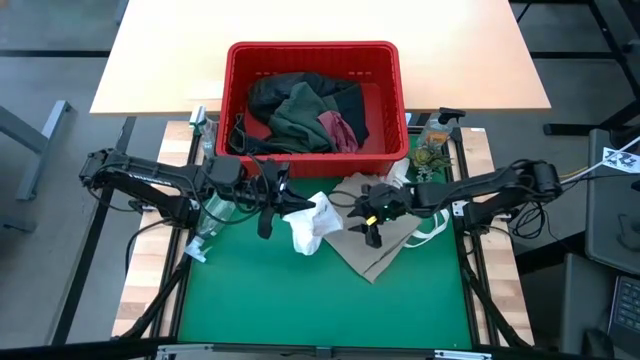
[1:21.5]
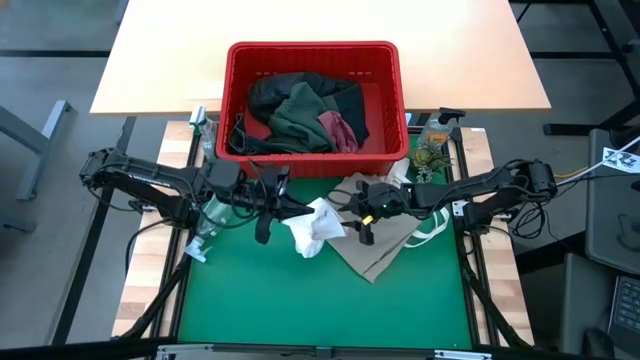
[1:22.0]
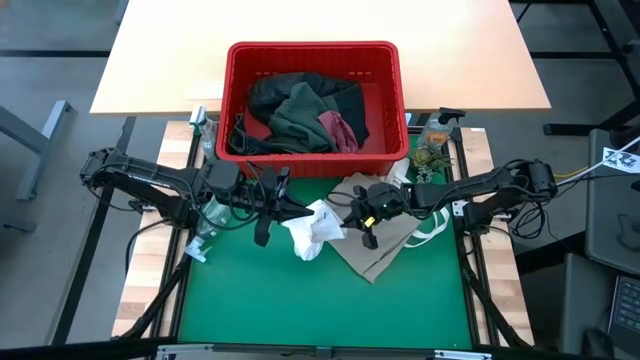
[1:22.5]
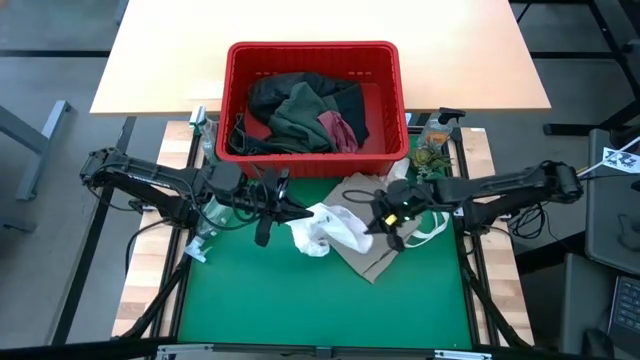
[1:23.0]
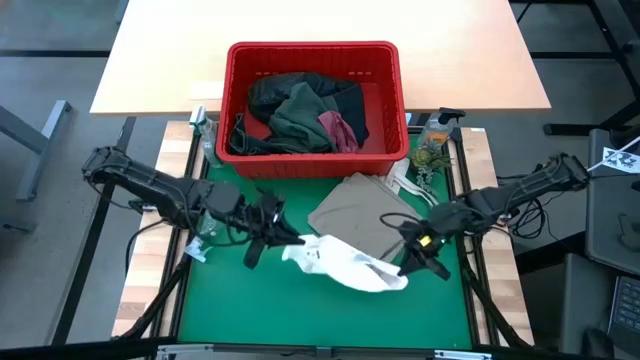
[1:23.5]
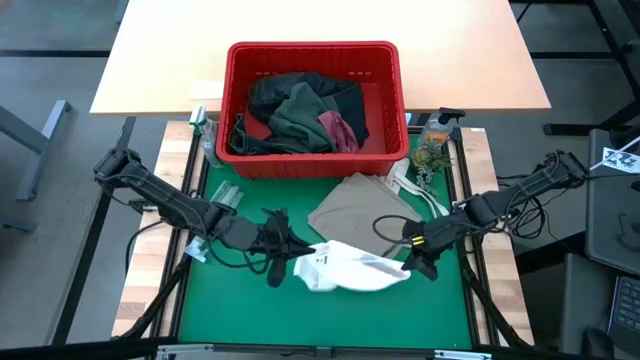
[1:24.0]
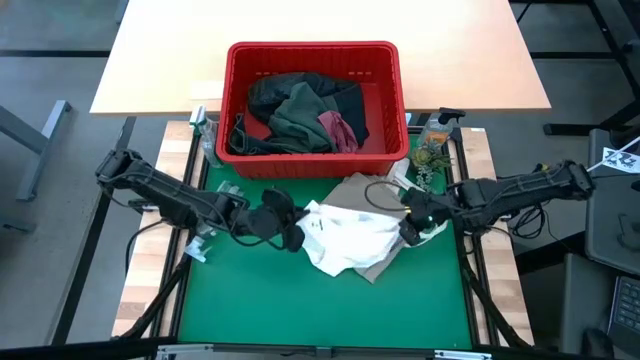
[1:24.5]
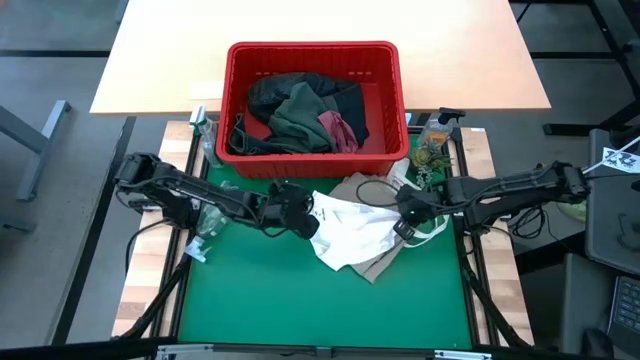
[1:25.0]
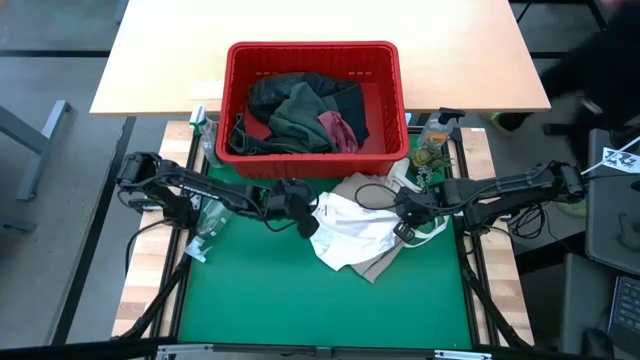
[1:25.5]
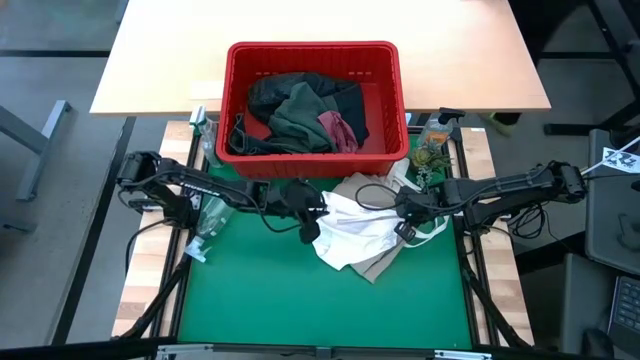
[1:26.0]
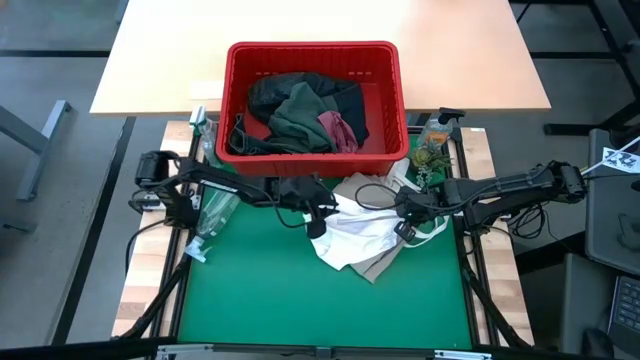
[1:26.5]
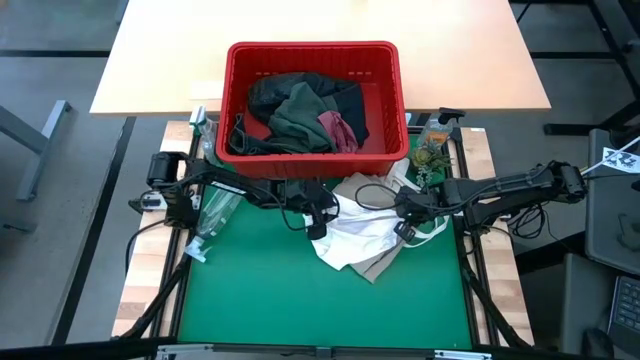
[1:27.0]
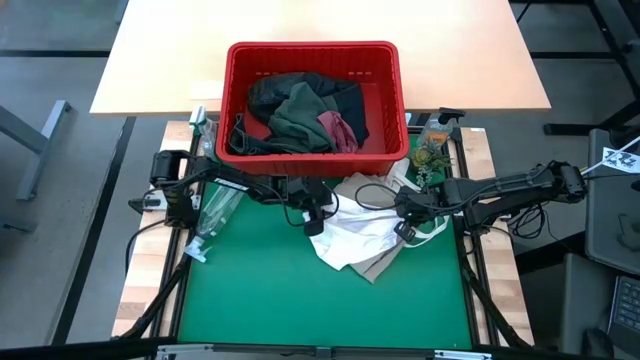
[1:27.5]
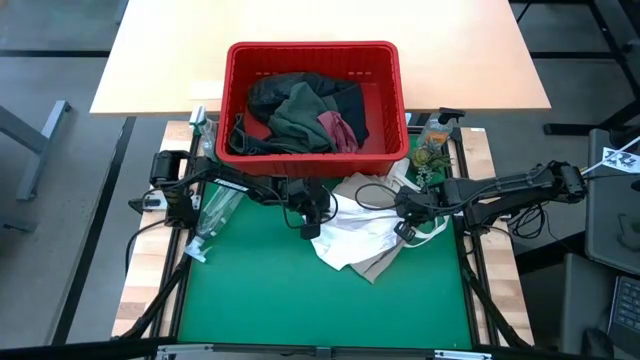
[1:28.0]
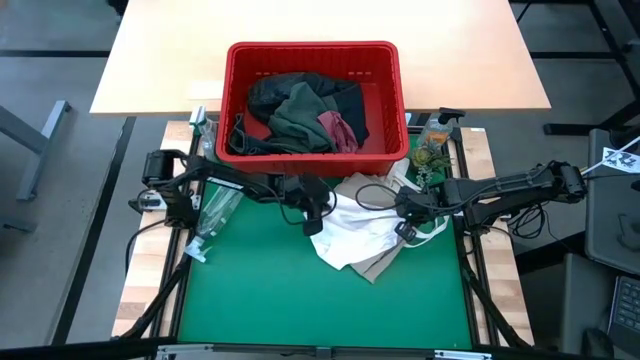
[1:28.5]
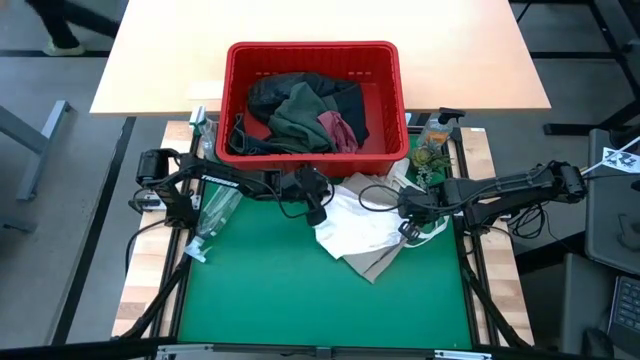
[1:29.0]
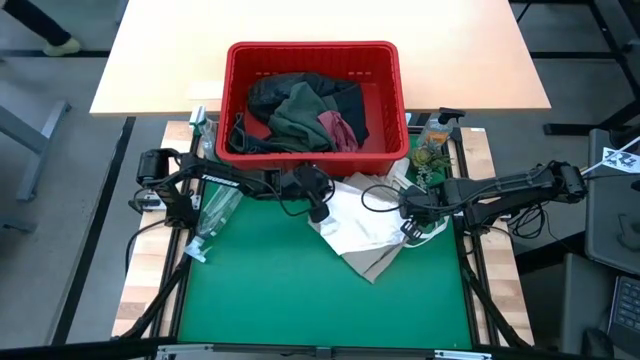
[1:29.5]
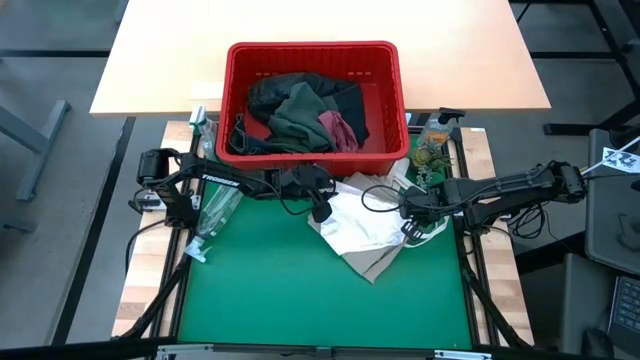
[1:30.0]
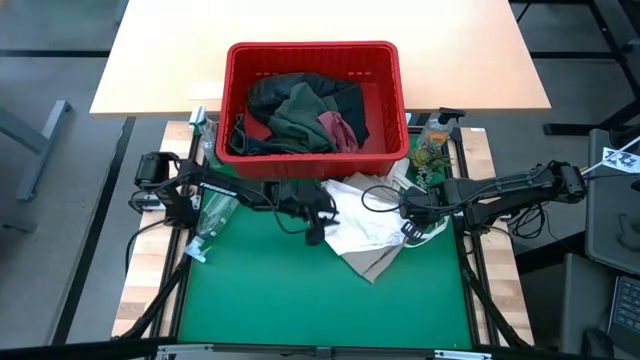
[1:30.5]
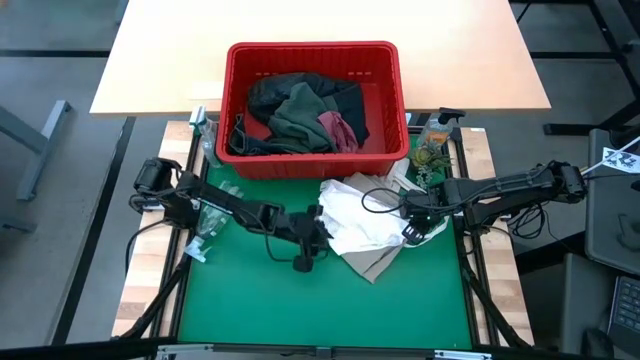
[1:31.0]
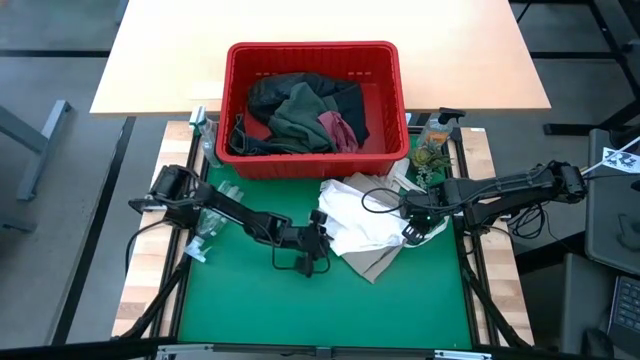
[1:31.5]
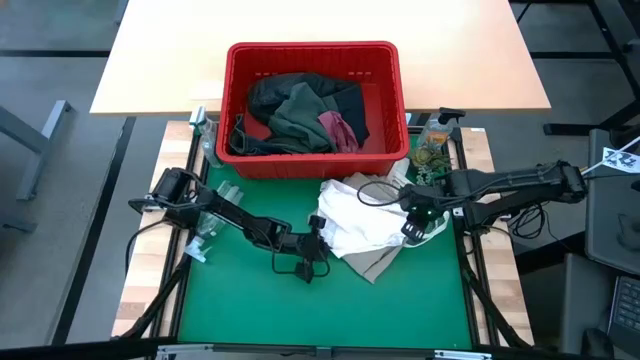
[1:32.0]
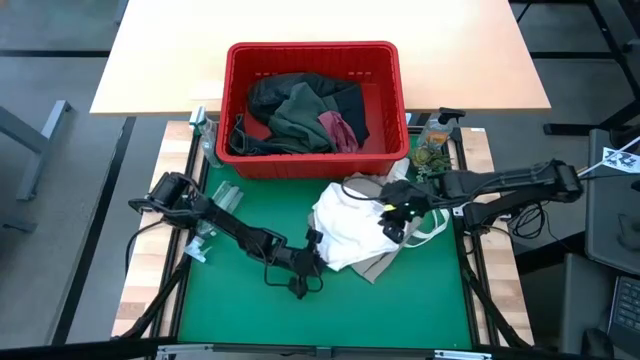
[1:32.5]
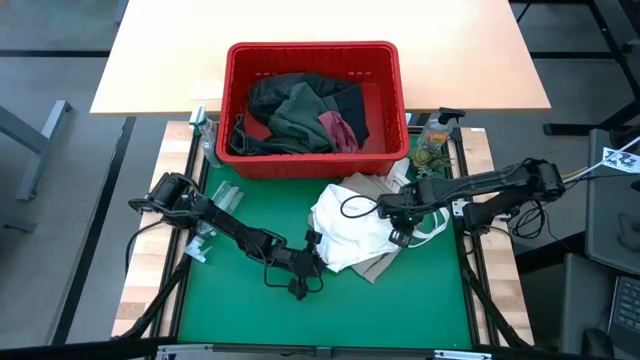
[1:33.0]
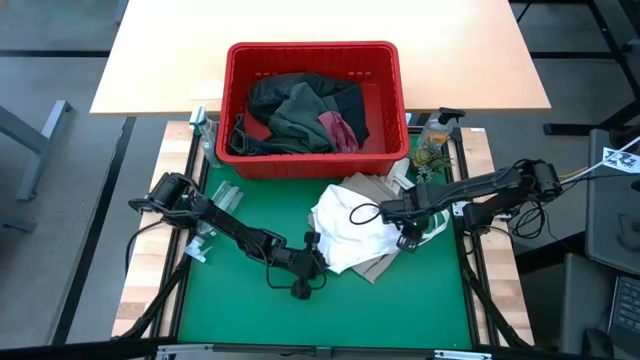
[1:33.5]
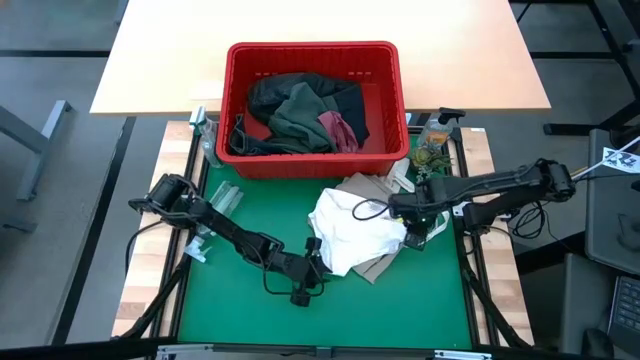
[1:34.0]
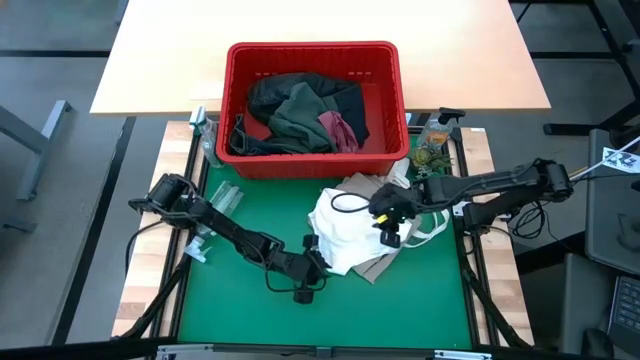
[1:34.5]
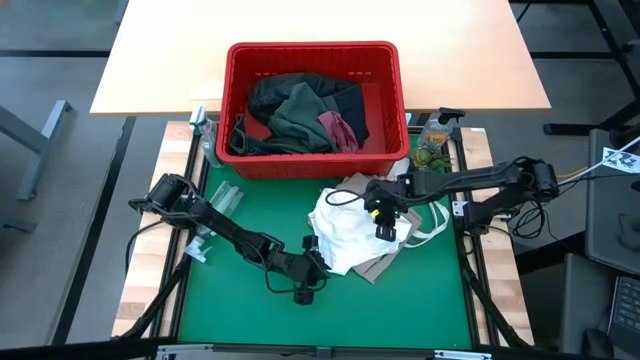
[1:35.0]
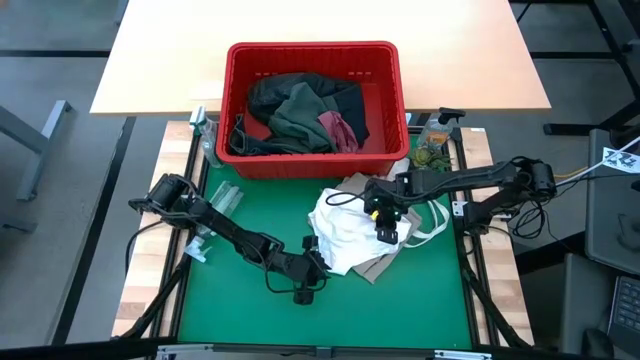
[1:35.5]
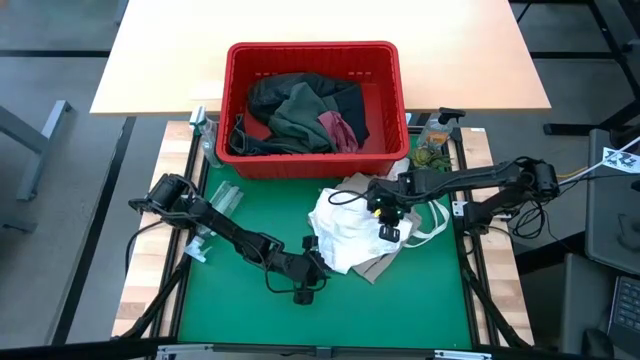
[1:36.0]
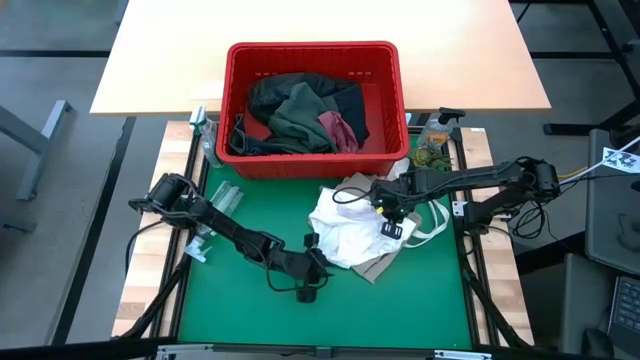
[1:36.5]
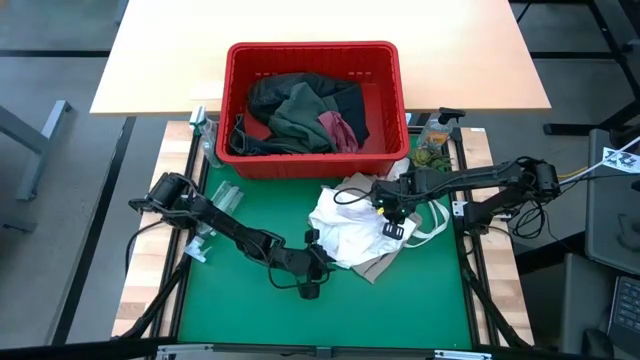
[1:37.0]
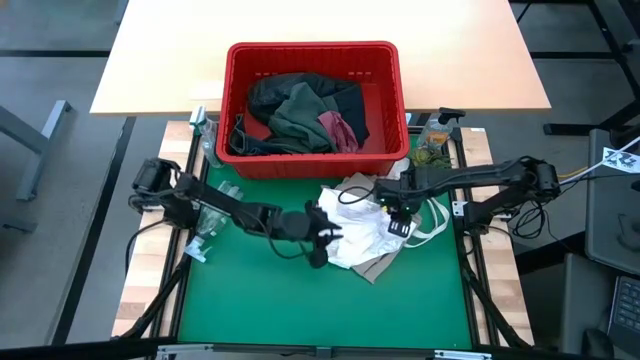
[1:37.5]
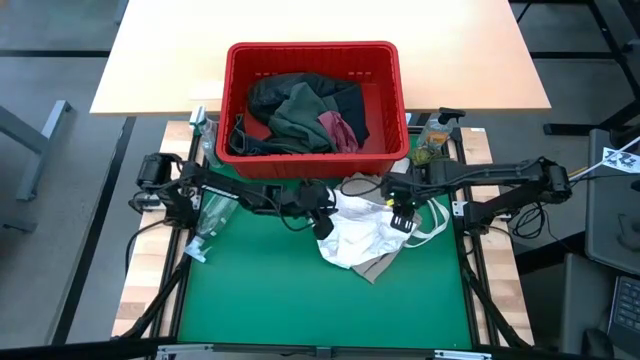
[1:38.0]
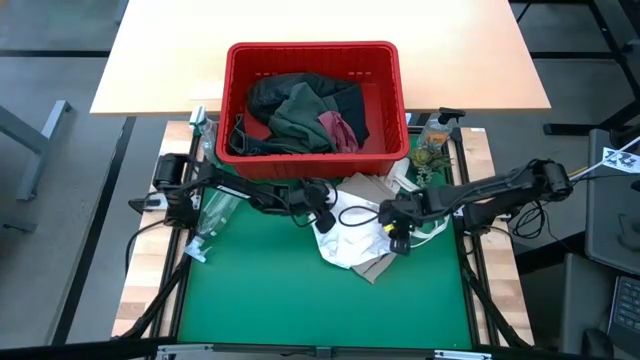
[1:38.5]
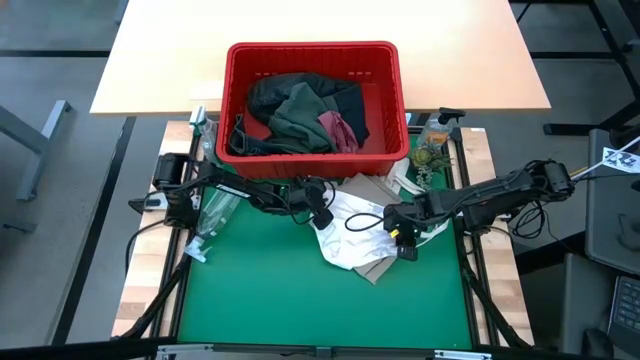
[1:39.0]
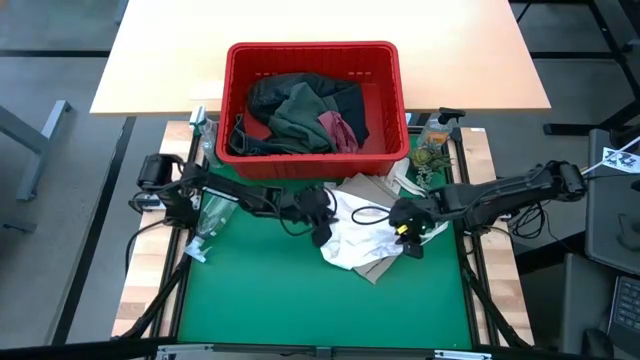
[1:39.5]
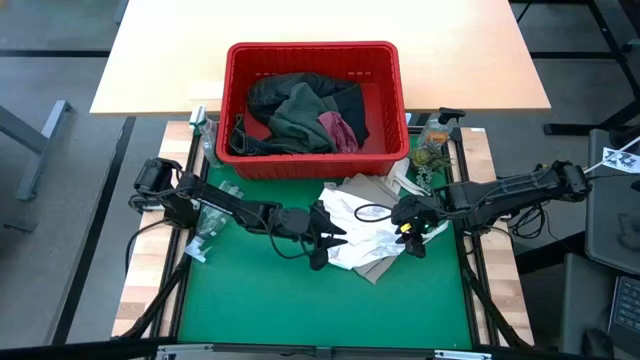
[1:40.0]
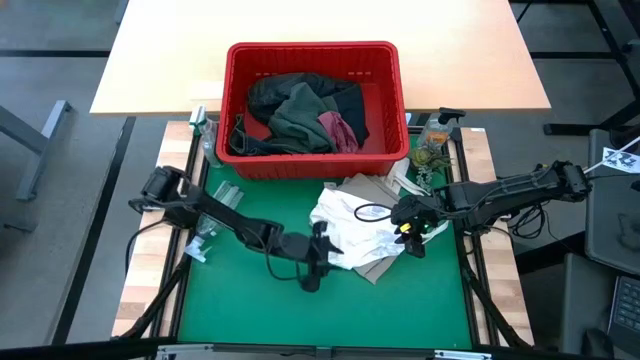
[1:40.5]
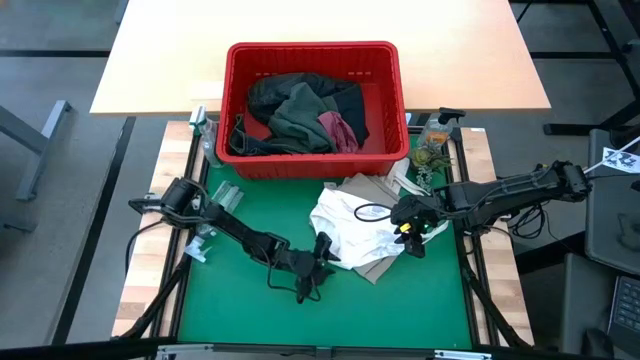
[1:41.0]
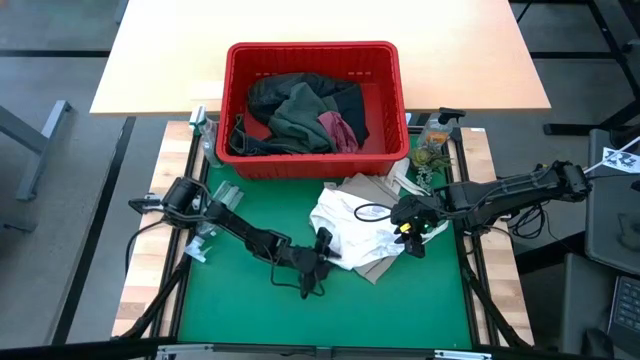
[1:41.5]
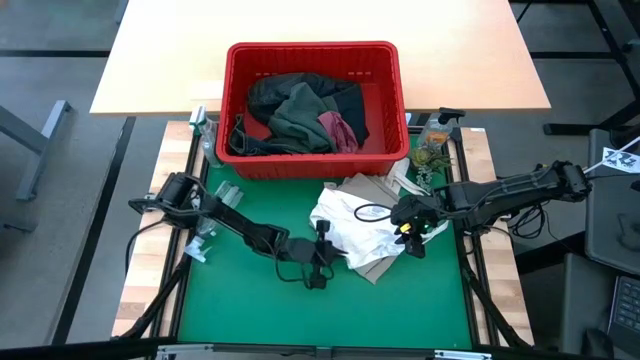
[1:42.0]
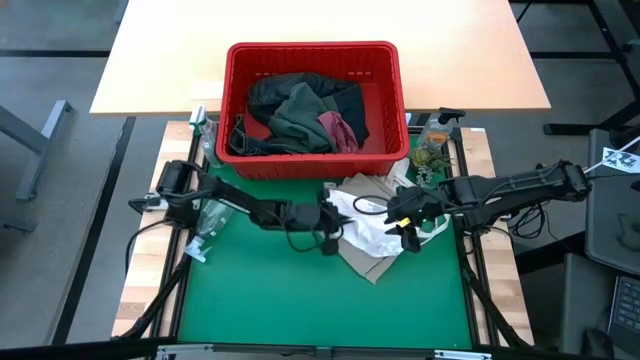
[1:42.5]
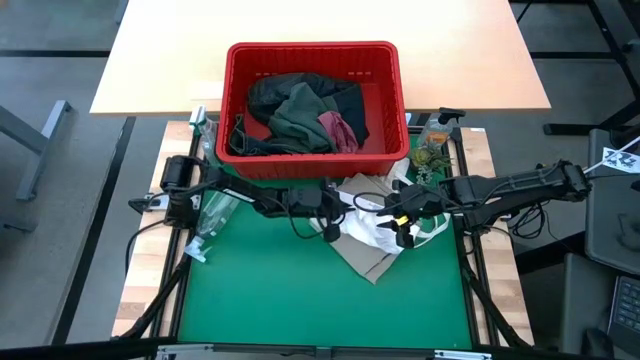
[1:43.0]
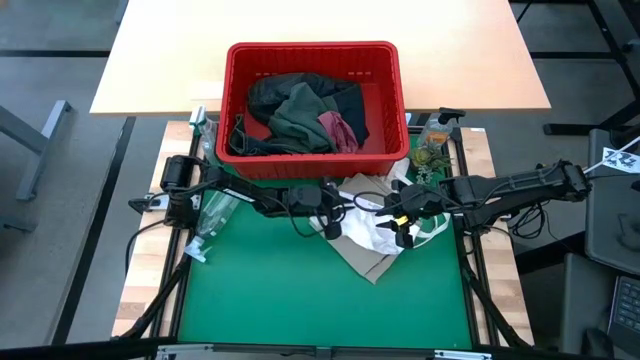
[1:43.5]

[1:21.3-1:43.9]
Task: Fold laundry
Fold the white underwear
